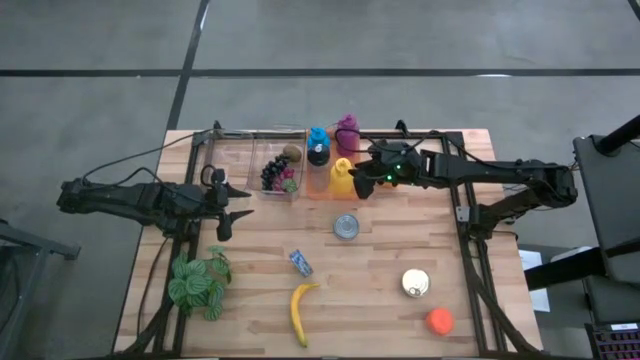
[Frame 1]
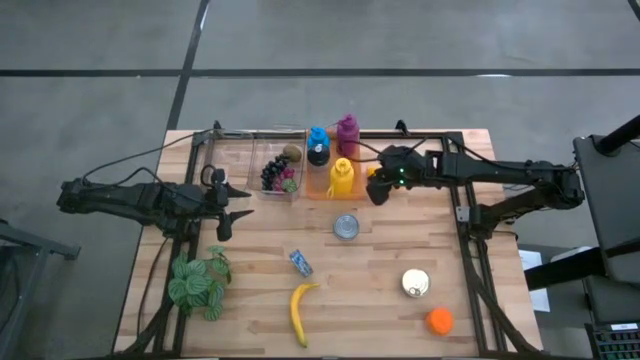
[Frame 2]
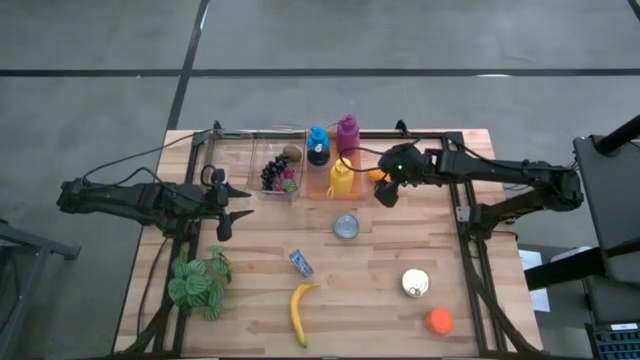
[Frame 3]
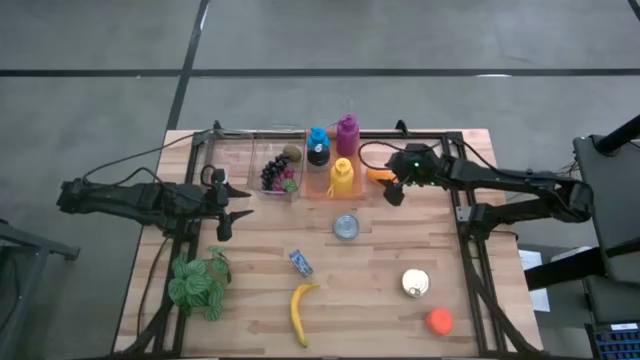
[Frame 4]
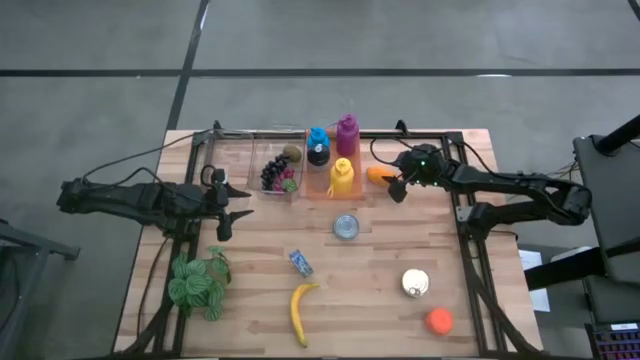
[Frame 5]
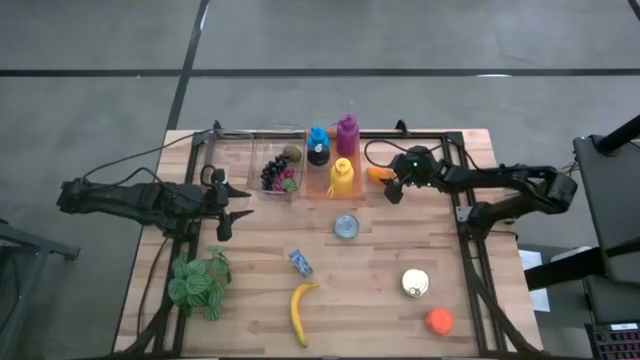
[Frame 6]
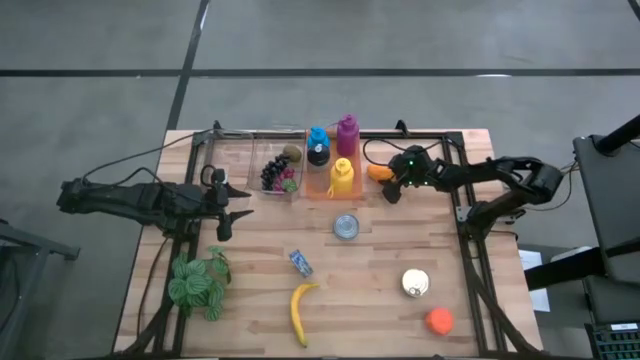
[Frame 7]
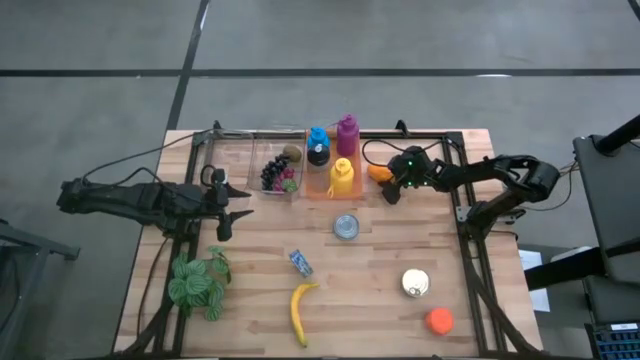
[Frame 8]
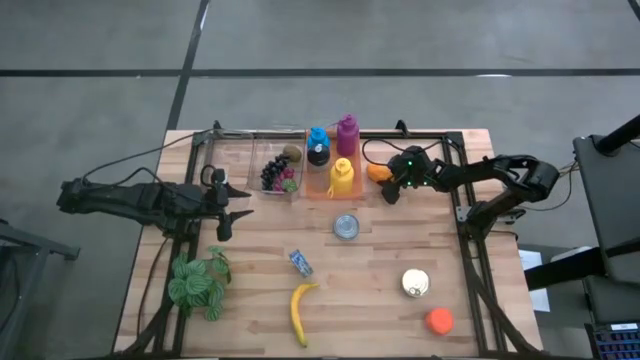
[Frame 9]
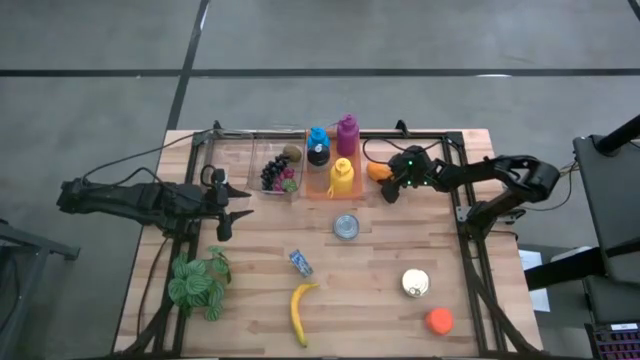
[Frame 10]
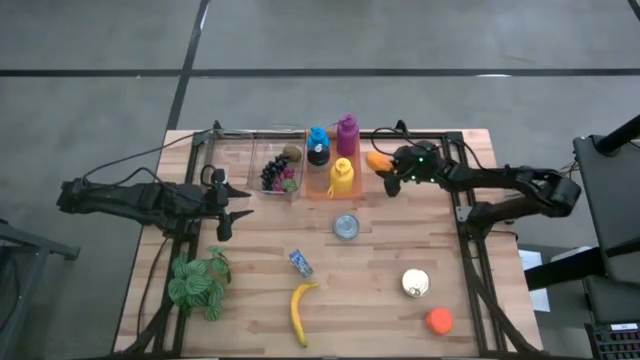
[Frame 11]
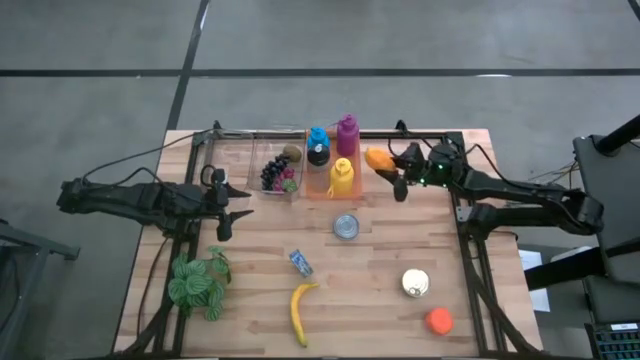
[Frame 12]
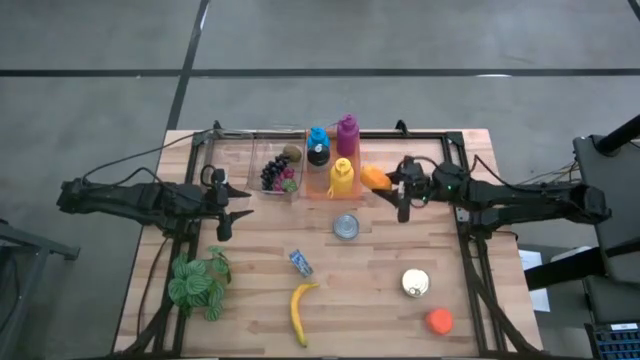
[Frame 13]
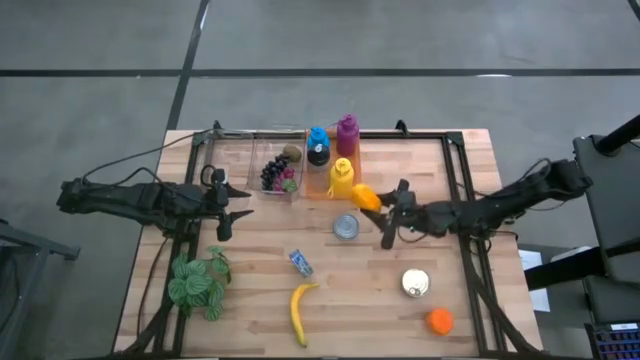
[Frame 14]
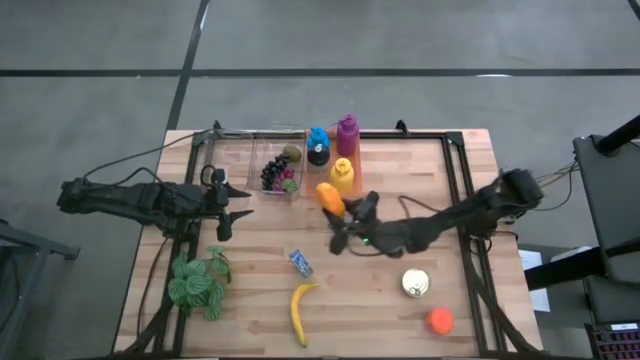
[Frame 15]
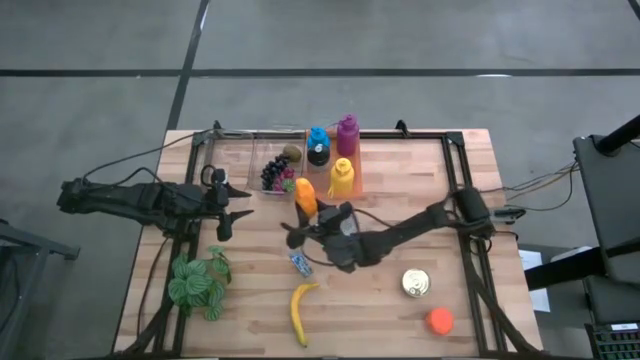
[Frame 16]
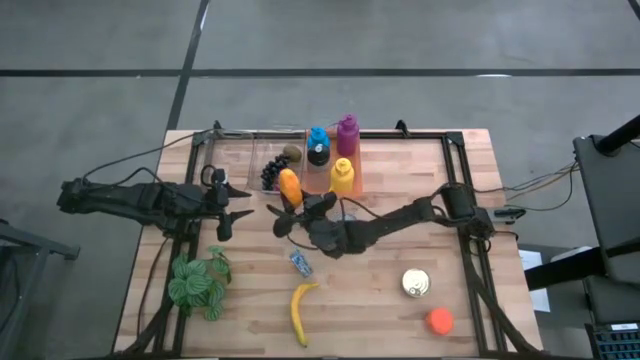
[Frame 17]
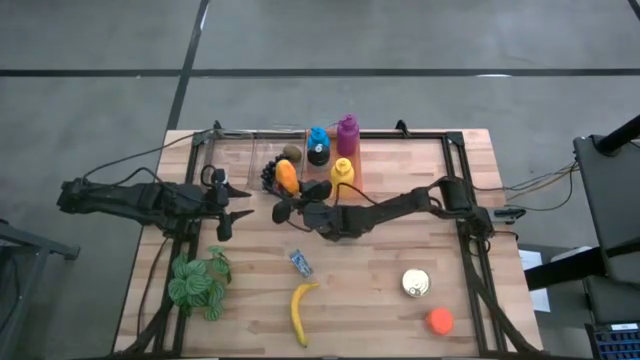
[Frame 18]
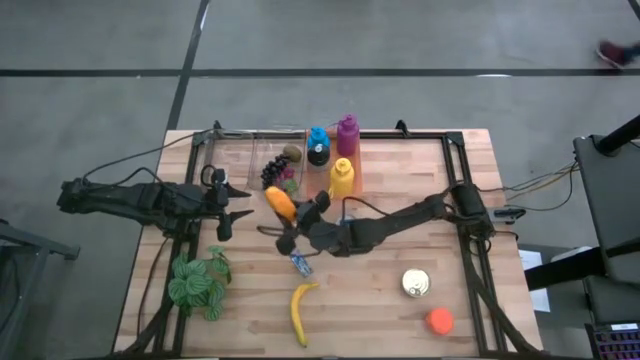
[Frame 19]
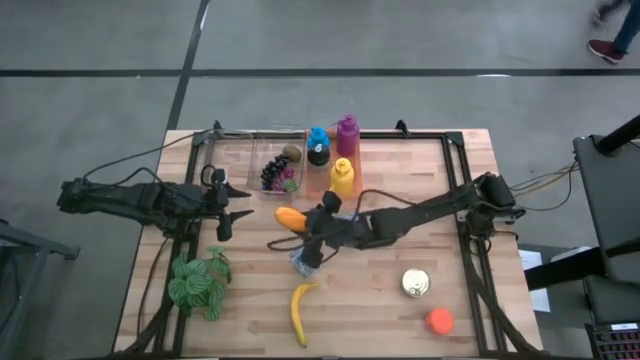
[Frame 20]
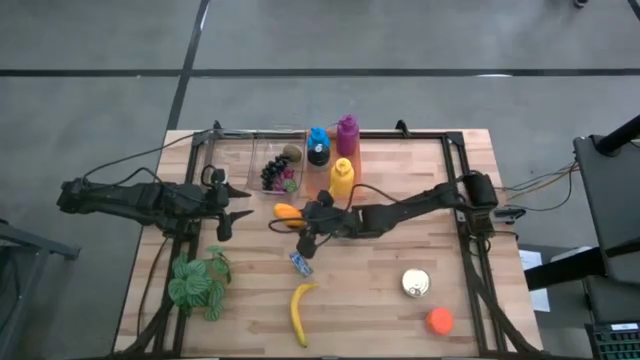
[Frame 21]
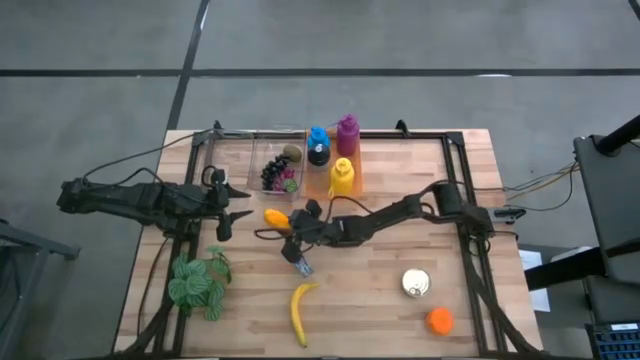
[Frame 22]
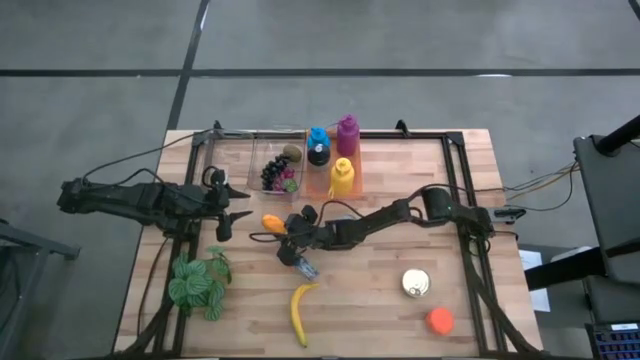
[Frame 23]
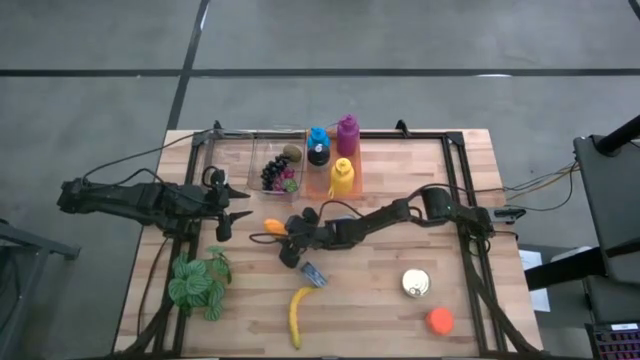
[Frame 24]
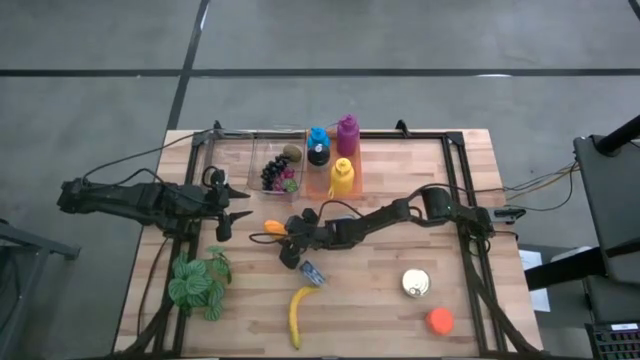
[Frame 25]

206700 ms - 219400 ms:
Task: Pick & Place Food Item
Put the yellow mango into the right transparent bin

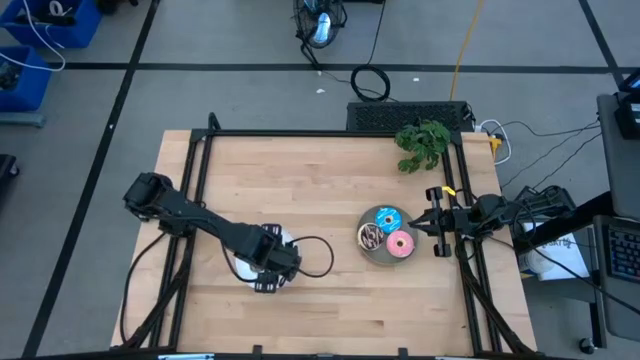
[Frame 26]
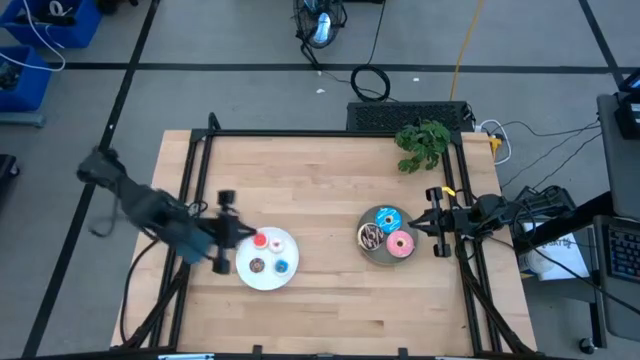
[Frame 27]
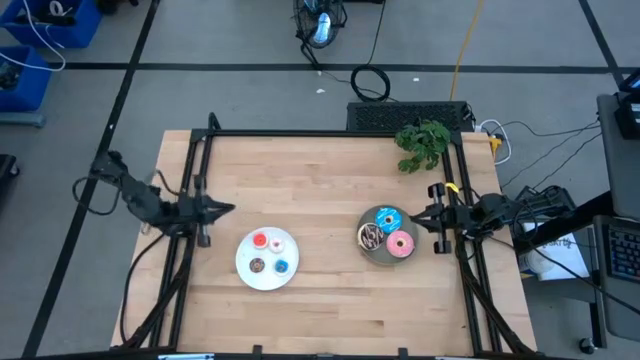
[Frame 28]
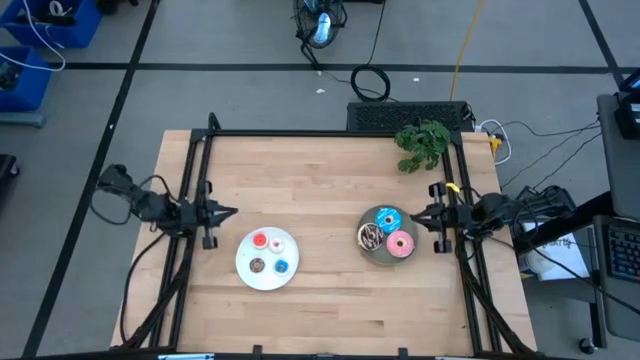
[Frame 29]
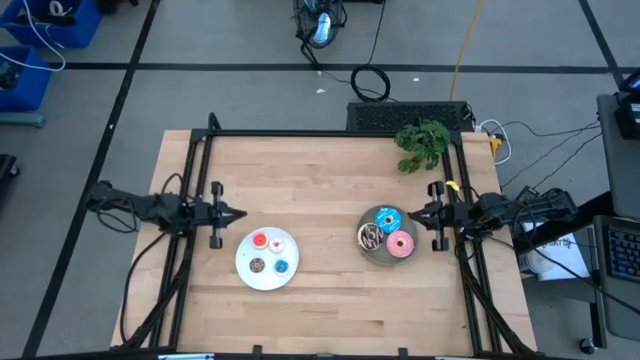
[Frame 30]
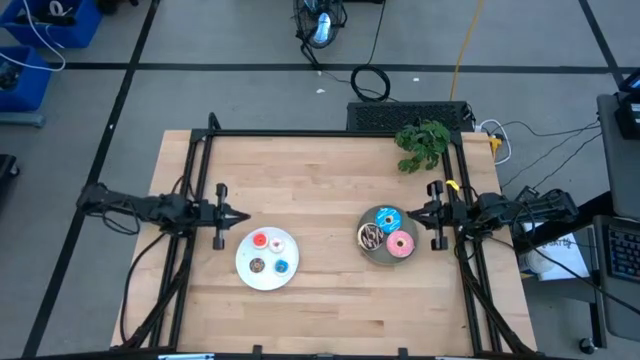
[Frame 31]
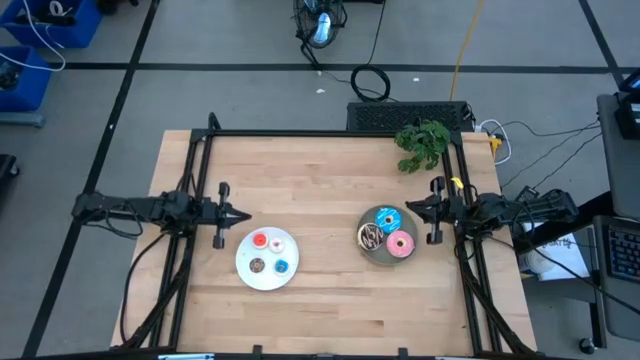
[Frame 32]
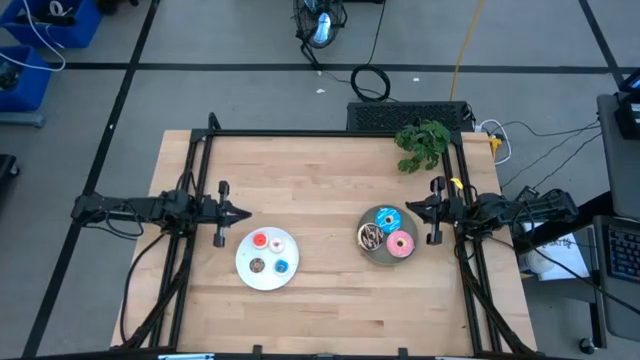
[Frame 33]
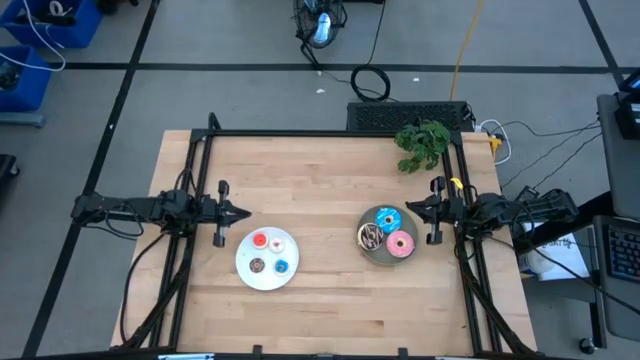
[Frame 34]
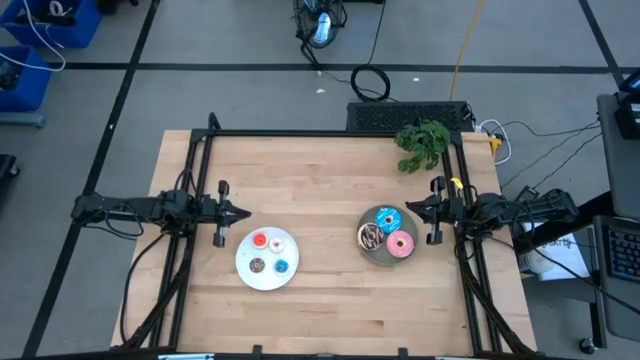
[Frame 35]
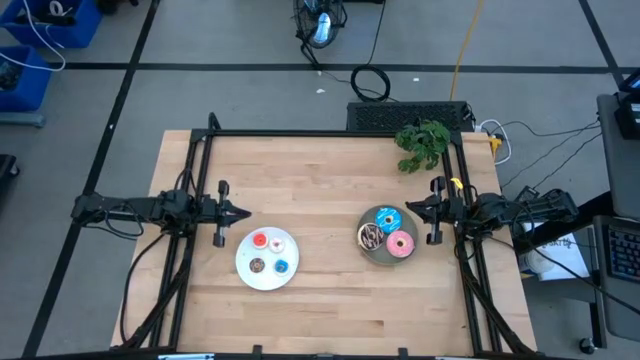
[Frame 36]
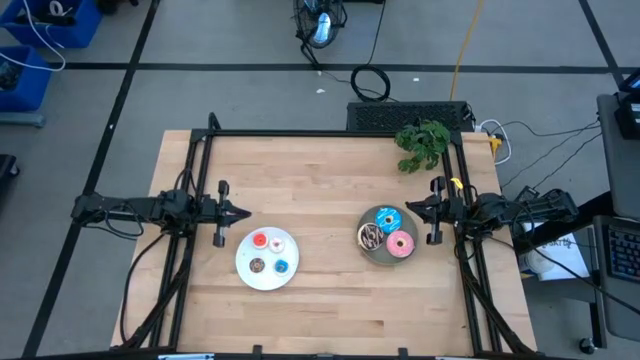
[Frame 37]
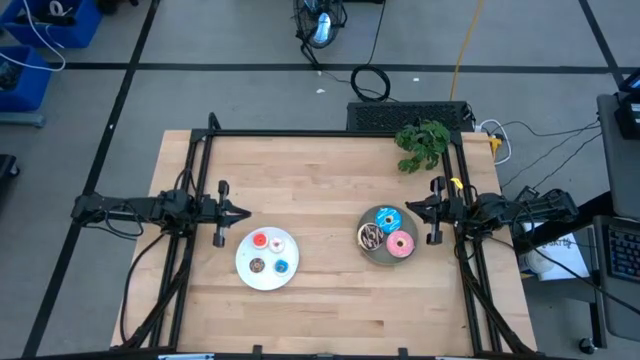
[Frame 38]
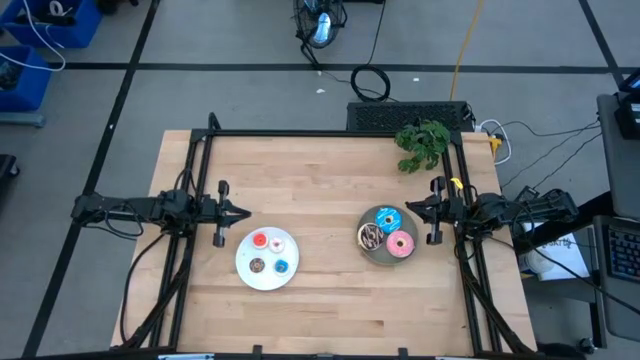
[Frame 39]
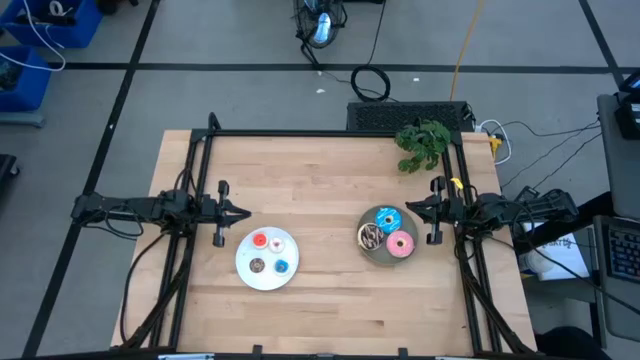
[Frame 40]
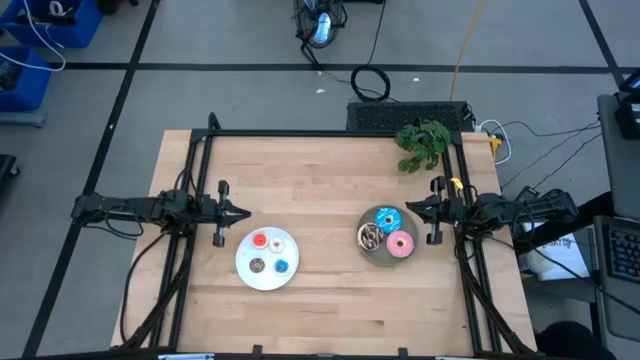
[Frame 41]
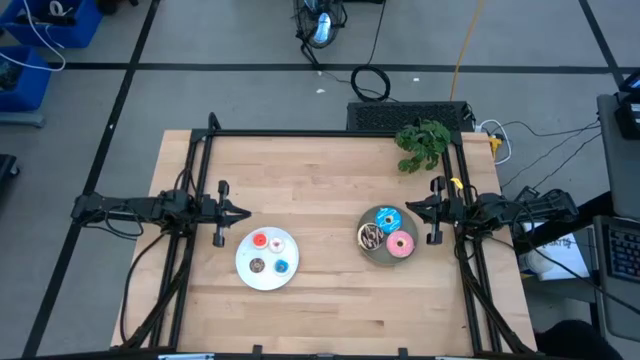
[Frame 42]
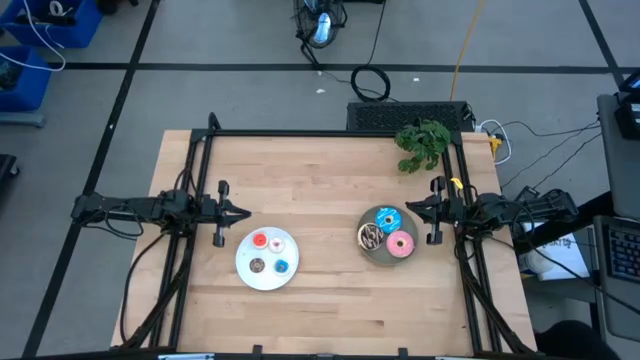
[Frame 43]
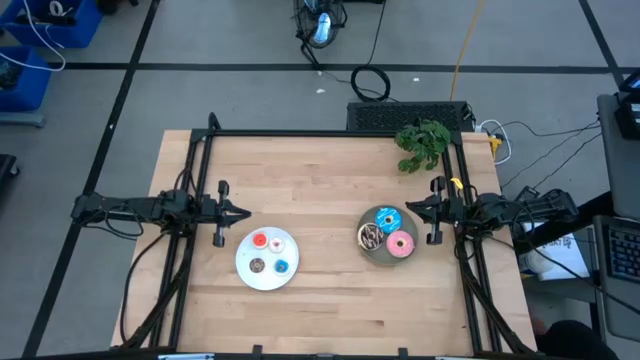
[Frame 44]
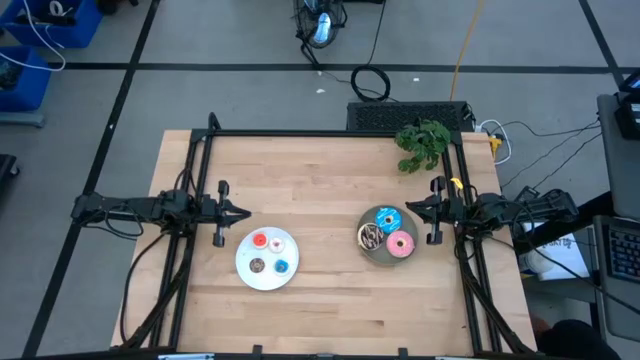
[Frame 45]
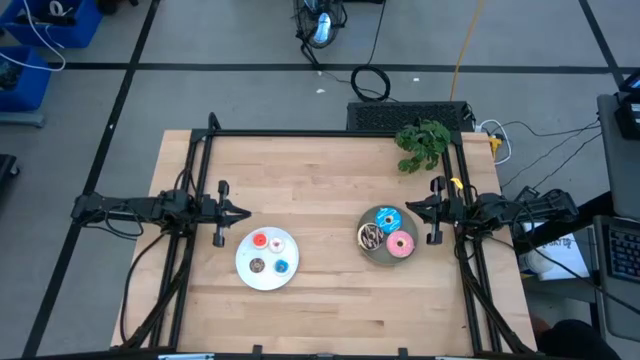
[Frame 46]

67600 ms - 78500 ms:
Task: Pick & Place donuts
Return to Home Position
